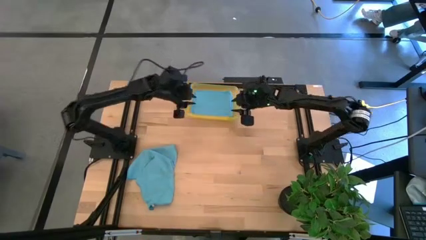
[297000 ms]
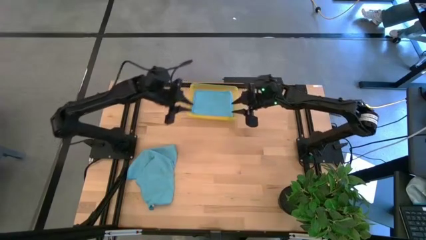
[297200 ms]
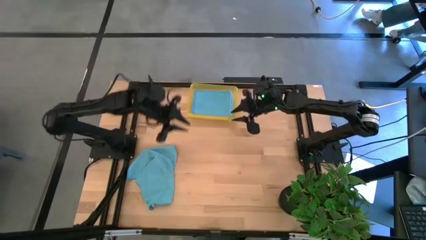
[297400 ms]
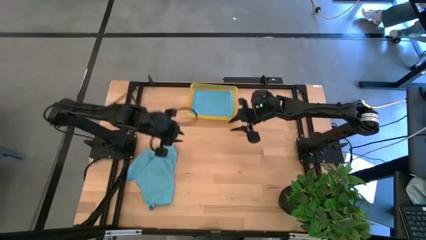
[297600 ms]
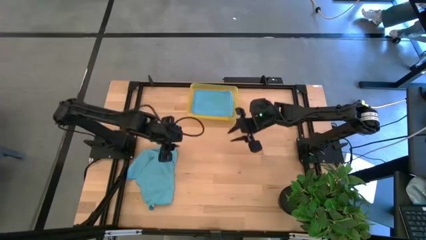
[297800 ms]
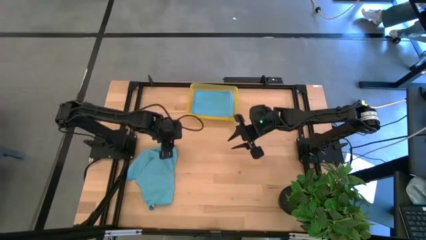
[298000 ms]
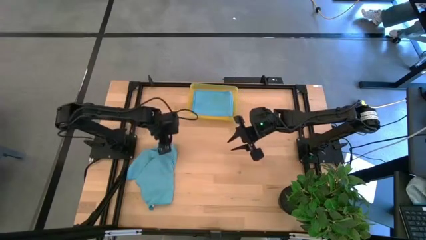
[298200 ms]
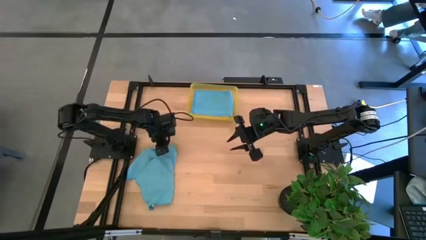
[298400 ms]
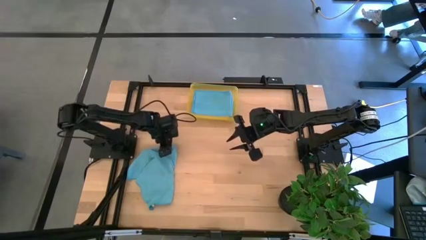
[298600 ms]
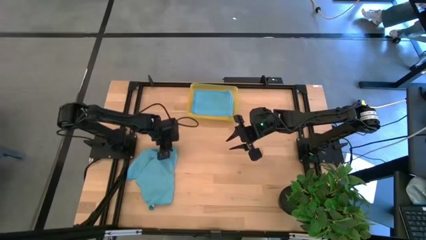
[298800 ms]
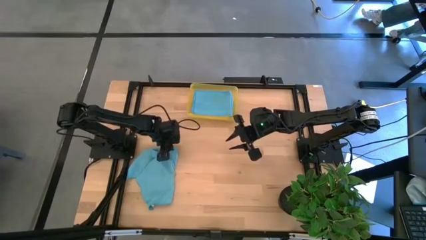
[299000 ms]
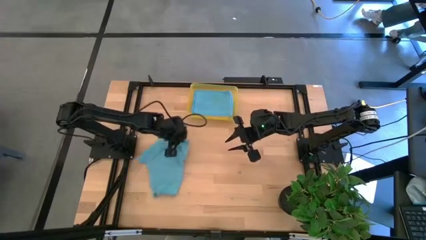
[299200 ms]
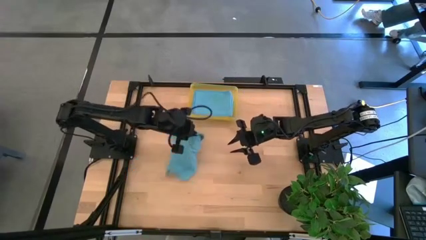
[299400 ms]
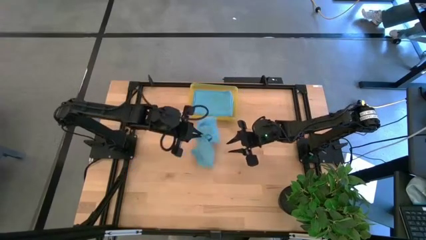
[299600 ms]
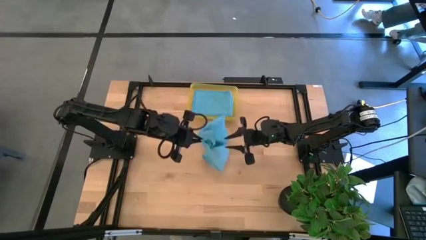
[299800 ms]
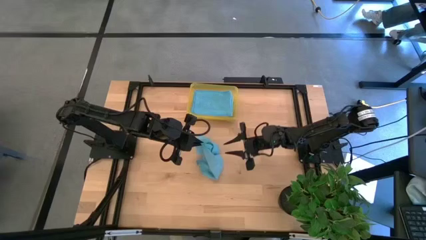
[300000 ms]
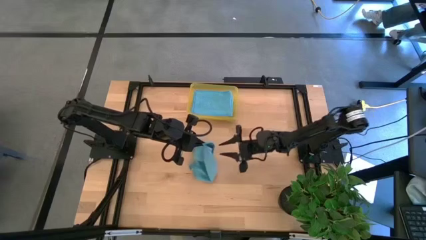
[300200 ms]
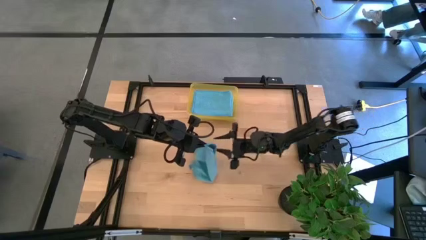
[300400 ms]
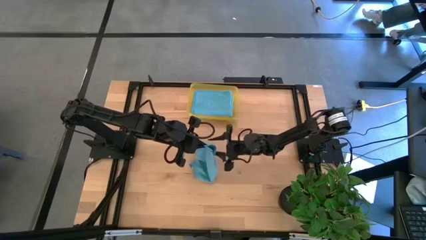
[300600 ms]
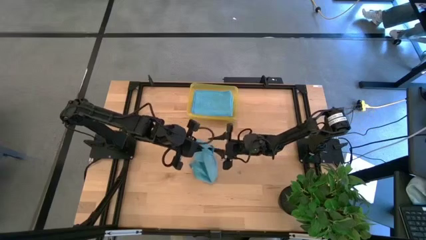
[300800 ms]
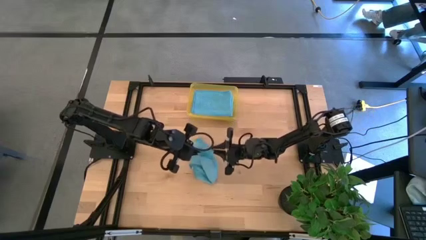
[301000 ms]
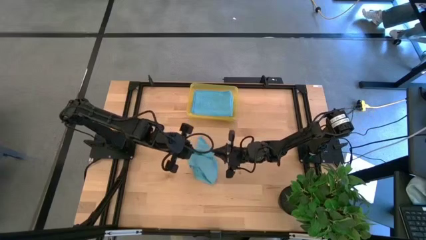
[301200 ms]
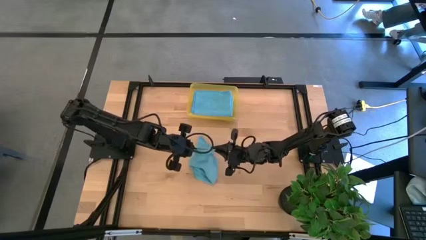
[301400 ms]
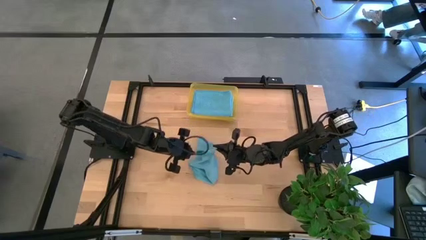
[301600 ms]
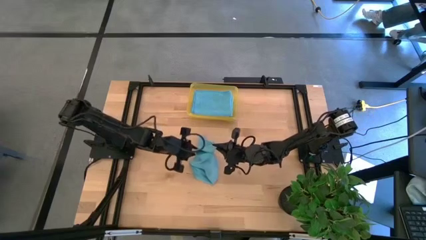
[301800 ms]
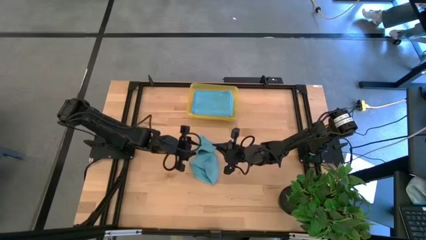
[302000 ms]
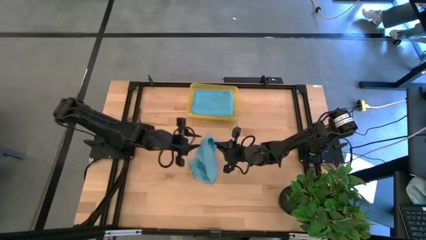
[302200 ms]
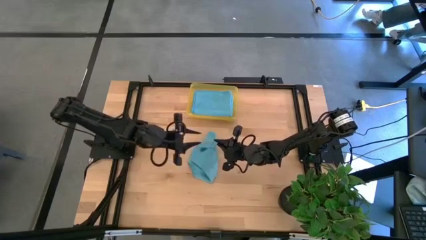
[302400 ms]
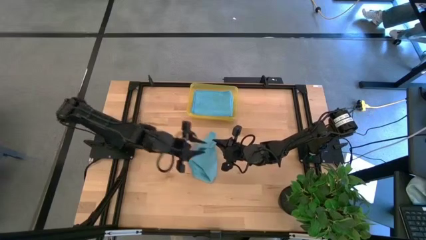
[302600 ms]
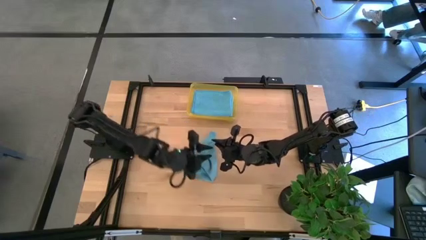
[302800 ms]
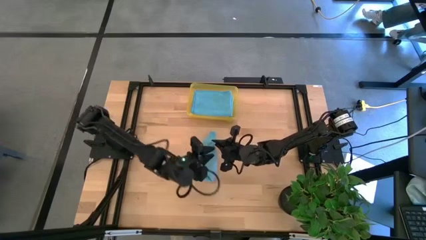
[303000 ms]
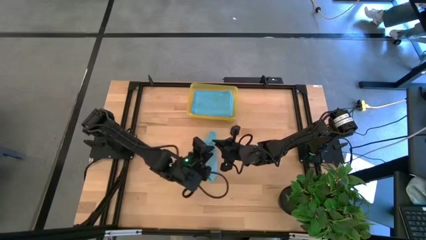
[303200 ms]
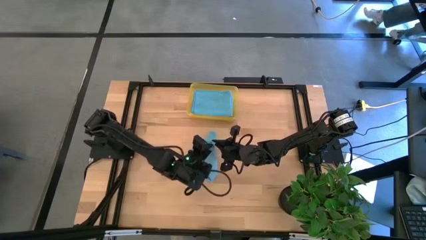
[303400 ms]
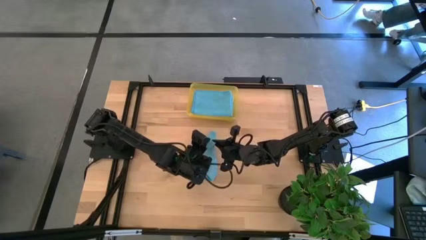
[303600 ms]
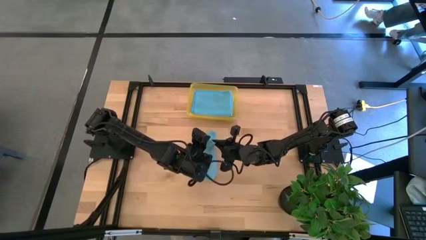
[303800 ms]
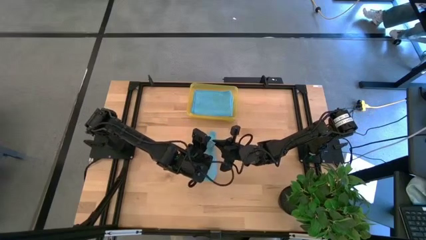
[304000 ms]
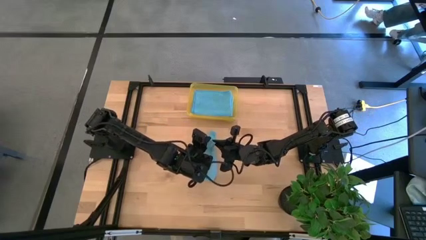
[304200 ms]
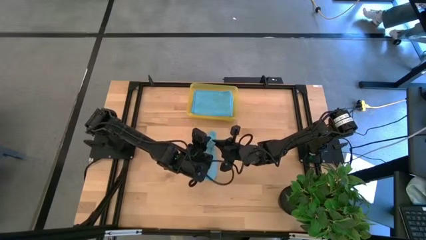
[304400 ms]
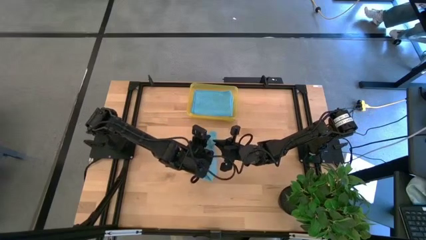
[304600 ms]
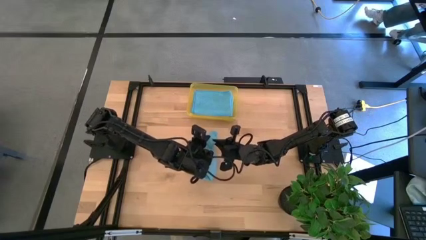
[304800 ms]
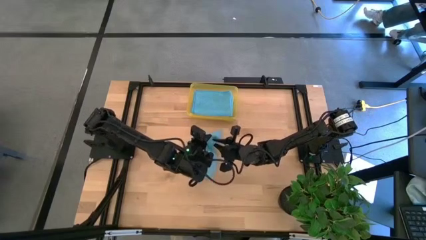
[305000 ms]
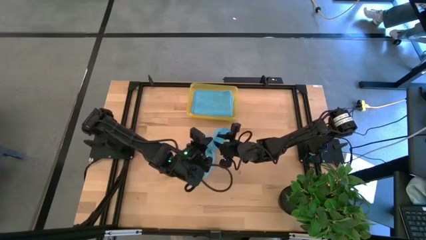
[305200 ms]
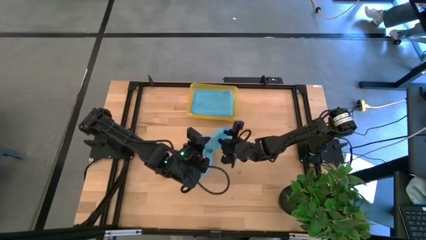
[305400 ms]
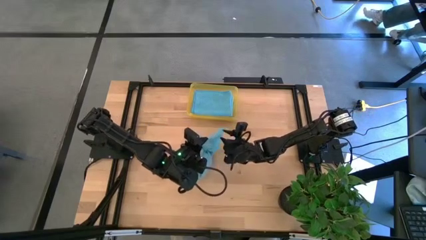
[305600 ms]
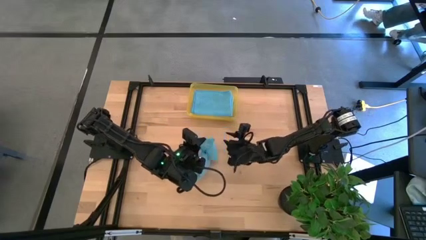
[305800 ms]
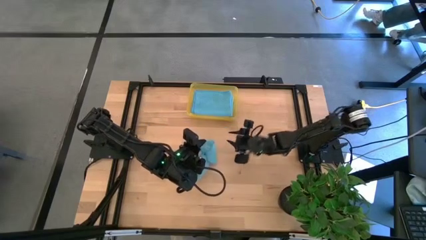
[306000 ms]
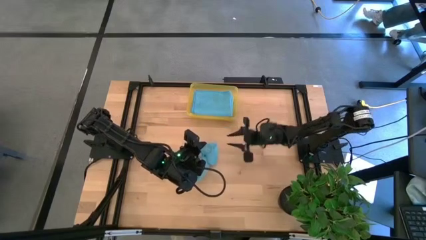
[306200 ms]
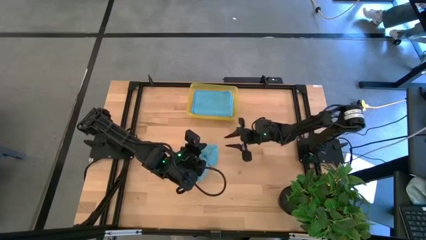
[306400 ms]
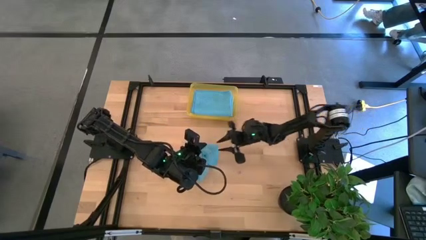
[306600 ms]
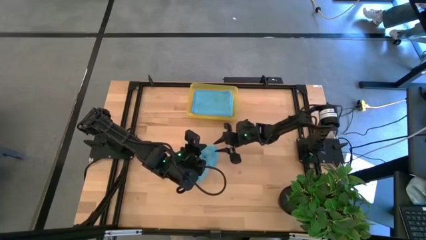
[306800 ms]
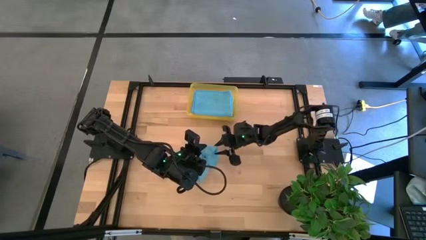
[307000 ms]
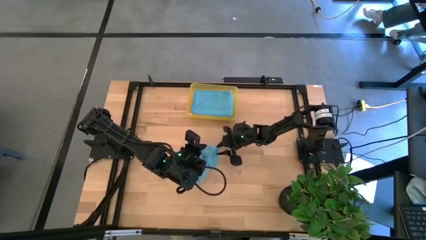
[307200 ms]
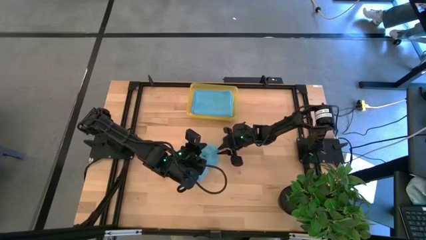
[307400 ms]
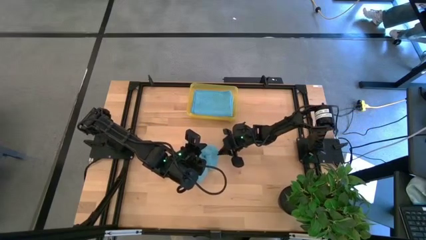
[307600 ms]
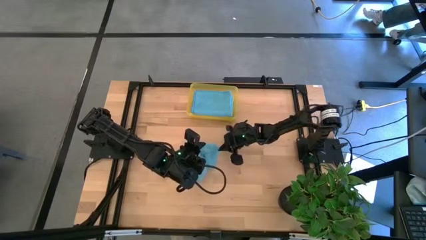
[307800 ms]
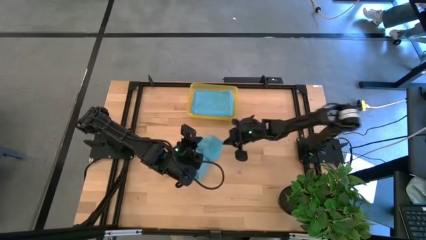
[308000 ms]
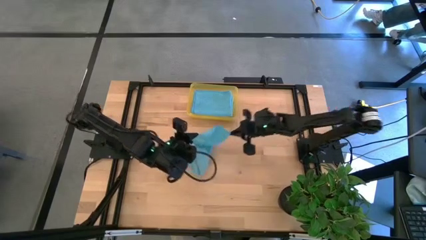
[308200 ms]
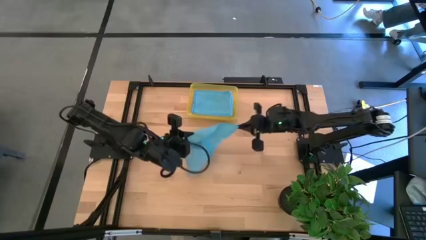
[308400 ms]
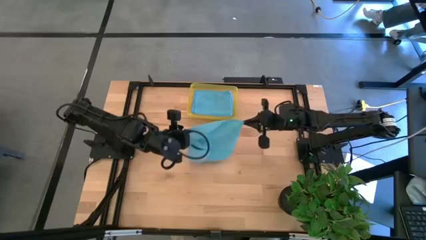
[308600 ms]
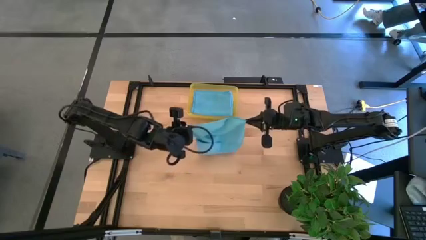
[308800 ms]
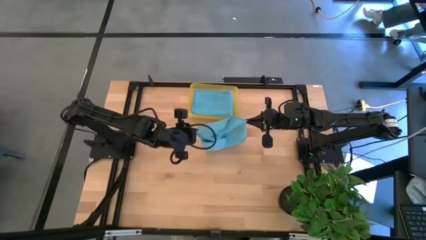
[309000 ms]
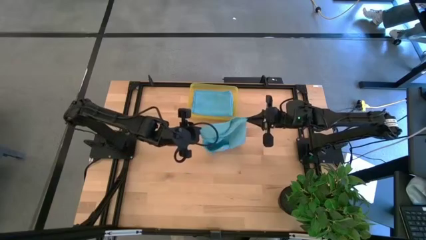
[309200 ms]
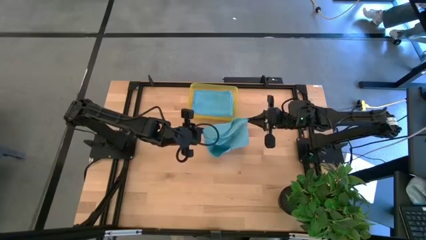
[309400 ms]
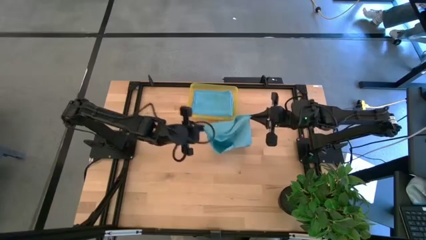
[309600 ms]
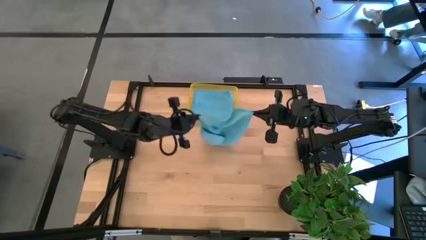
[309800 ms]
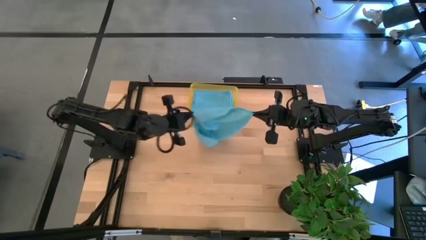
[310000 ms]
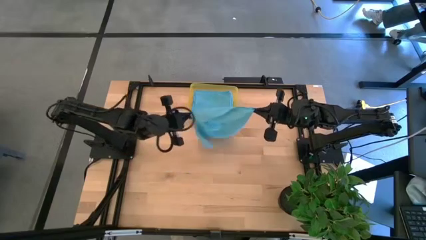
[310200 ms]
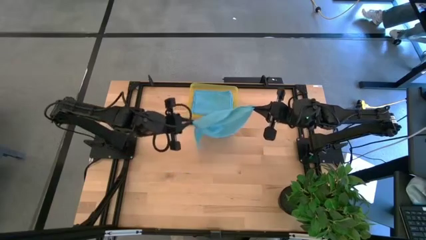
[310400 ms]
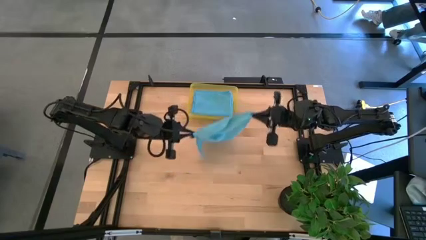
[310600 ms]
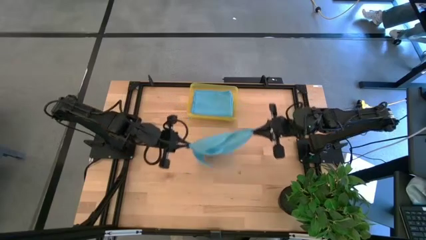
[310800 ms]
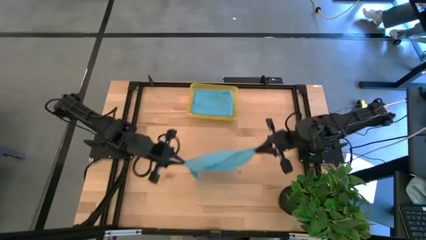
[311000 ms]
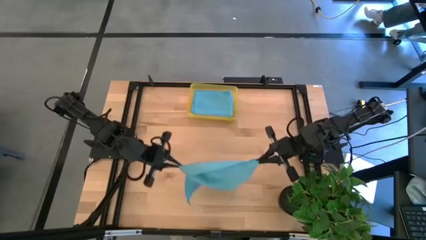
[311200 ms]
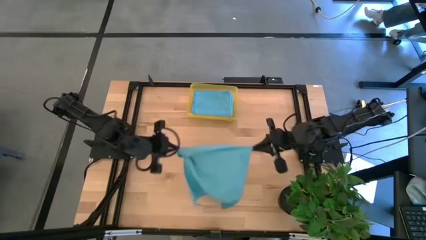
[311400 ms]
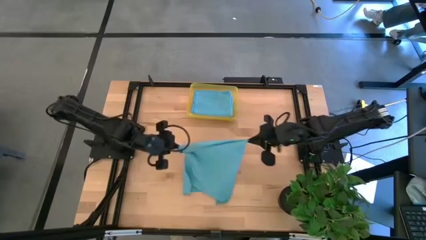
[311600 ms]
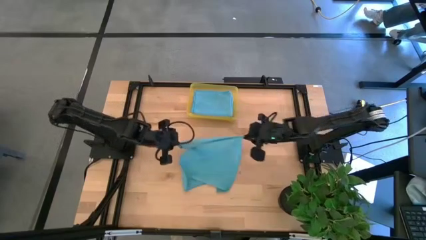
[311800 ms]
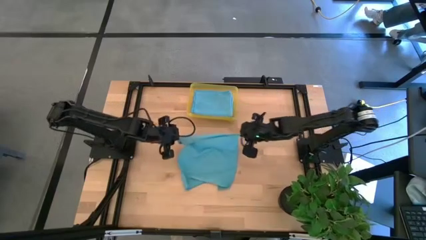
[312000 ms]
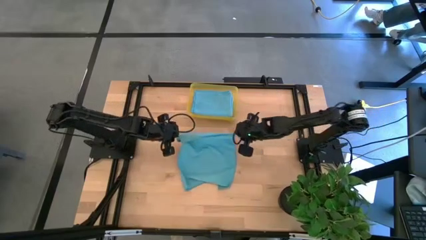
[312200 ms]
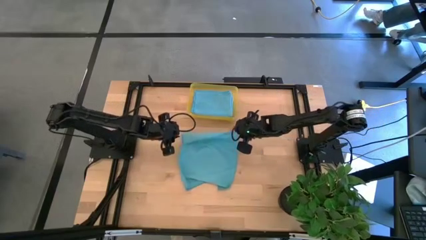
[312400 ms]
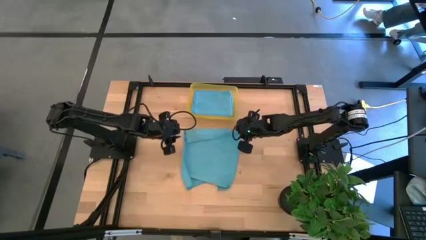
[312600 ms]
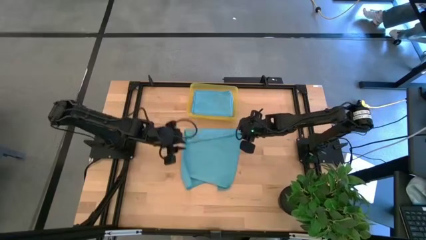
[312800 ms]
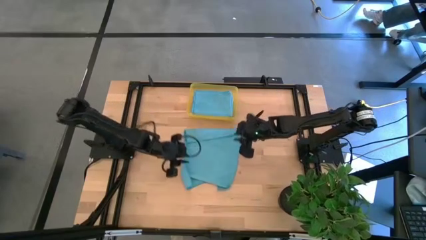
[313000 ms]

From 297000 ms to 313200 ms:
Task: Fold microfiber towels
Fold the blue towel
